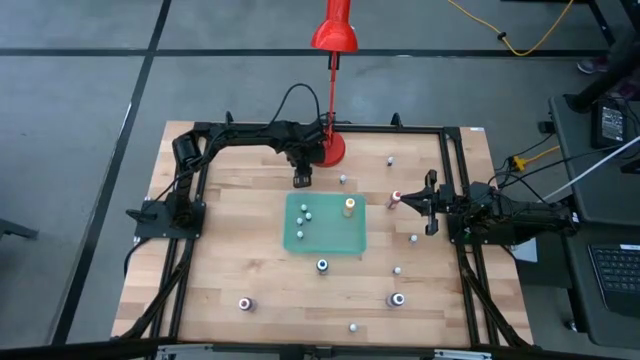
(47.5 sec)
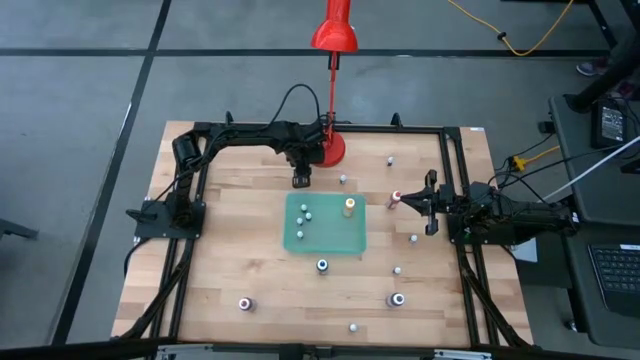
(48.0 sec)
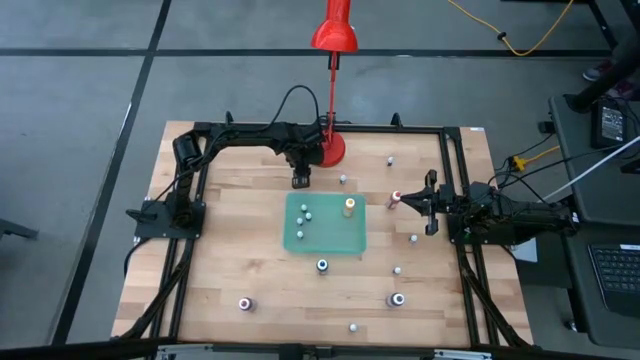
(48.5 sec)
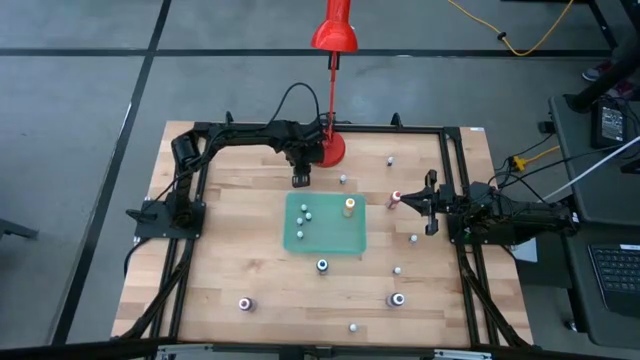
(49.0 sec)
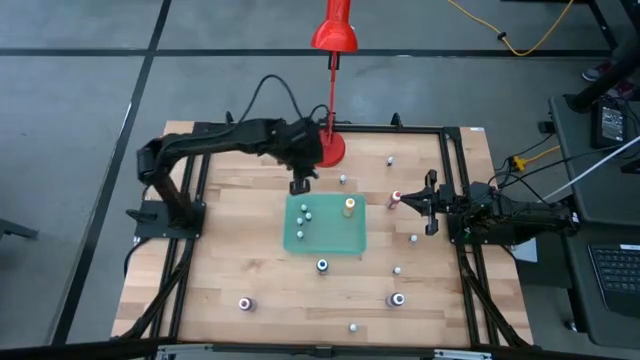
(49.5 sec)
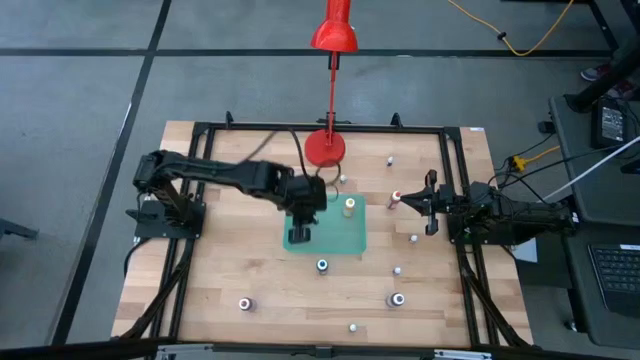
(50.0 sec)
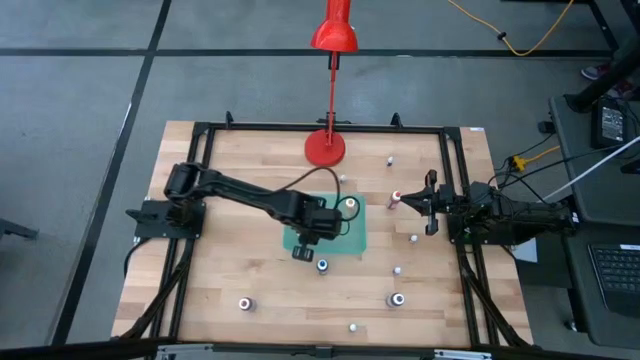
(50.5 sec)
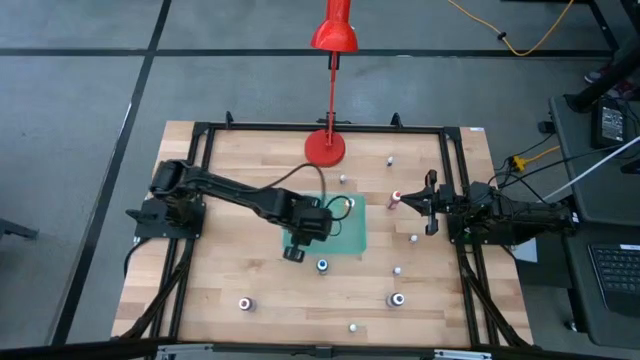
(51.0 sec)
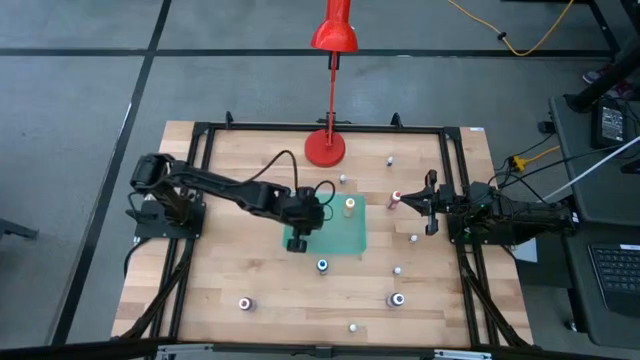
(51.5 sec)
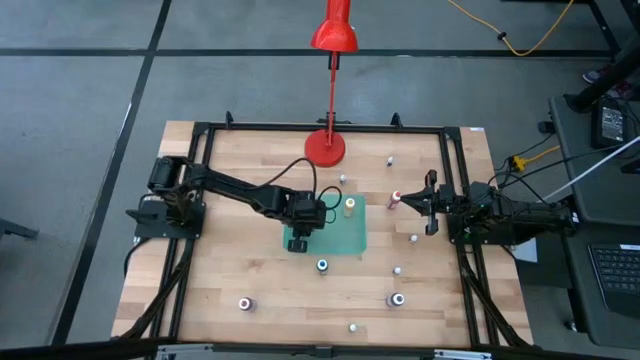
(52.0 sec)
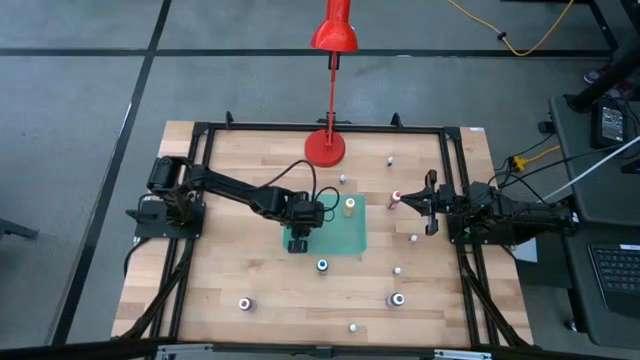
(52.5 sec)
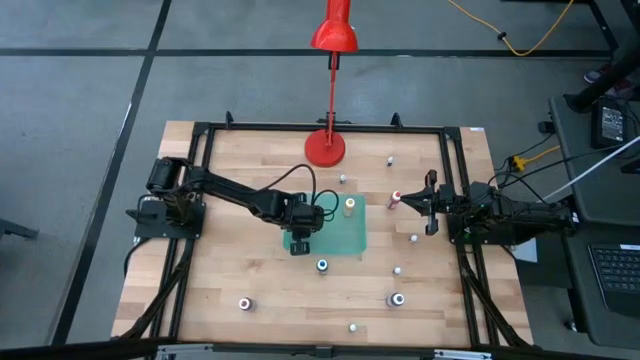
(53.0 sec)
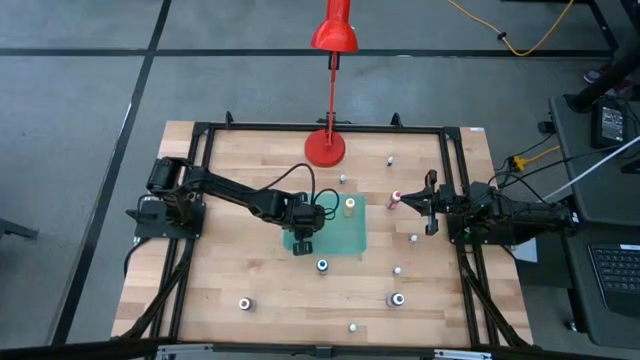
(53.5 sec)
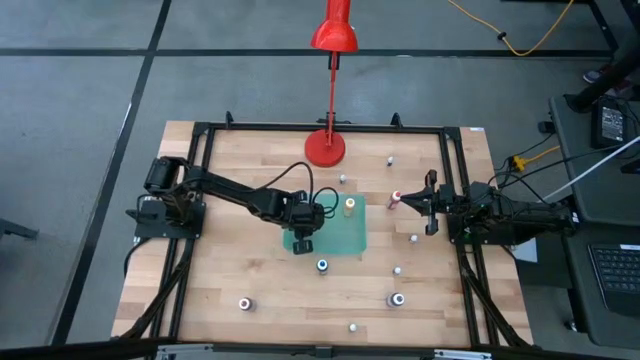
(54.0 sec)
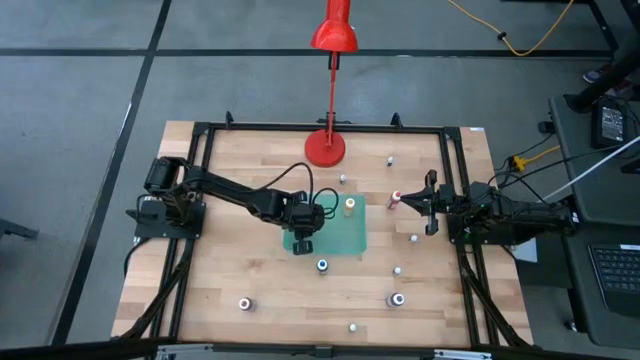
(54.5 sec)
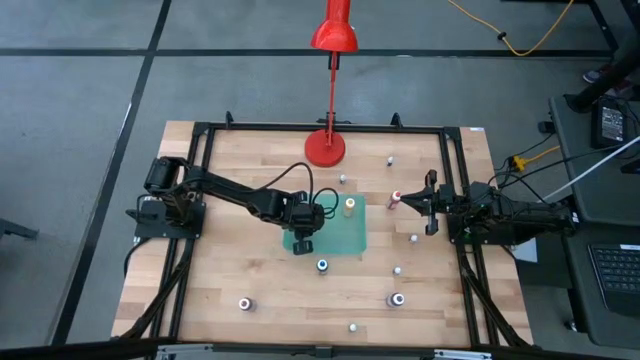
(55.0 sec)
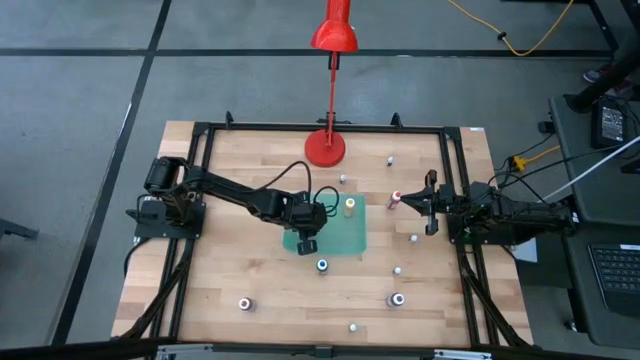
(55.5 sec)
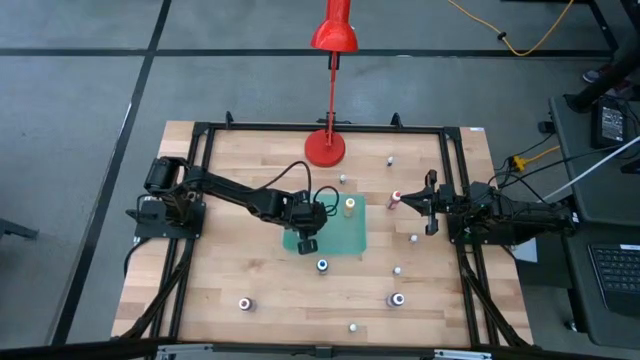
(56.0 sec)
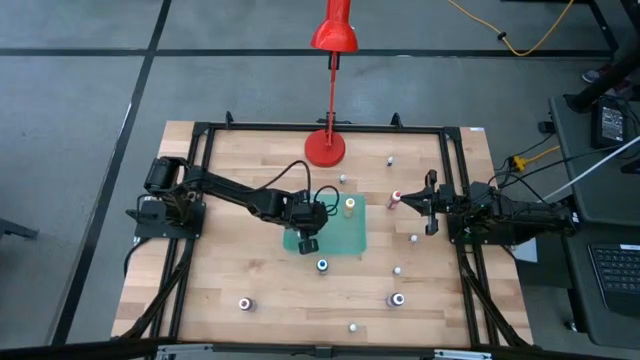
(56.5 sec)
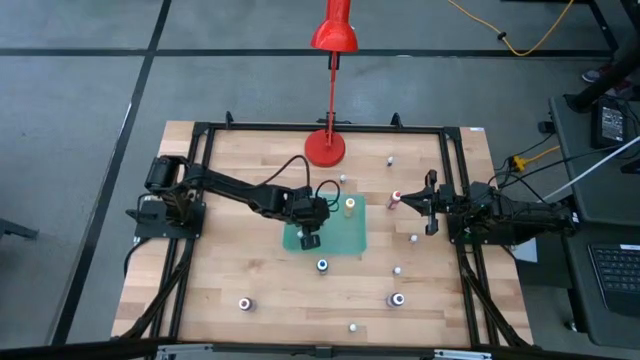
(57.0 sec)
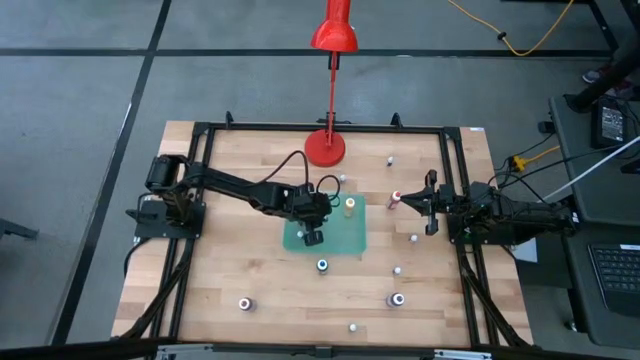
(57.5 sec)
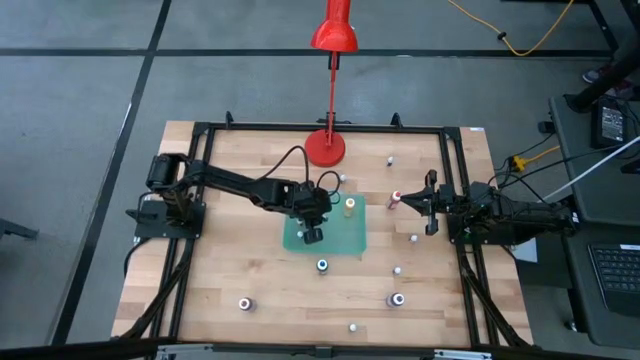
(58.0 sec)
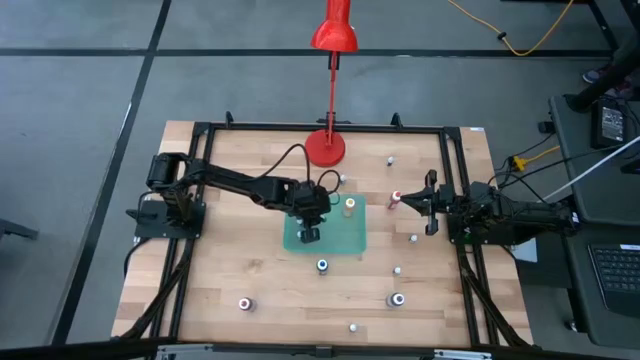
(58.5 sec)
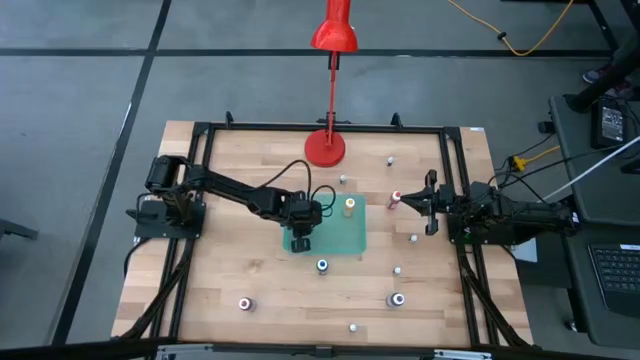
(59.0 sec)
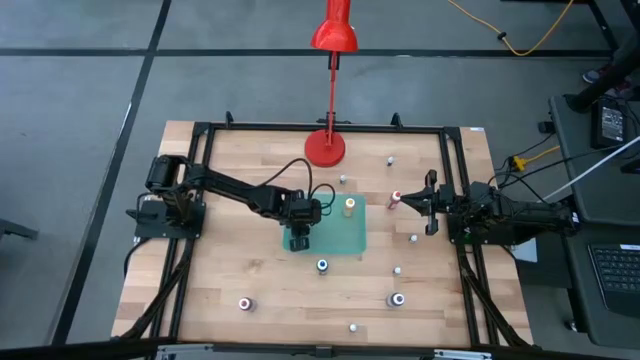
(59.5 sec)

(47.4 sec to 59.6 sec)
Task: Pick & Place food coloring
Put the small blue food coloring bottle into the green bin

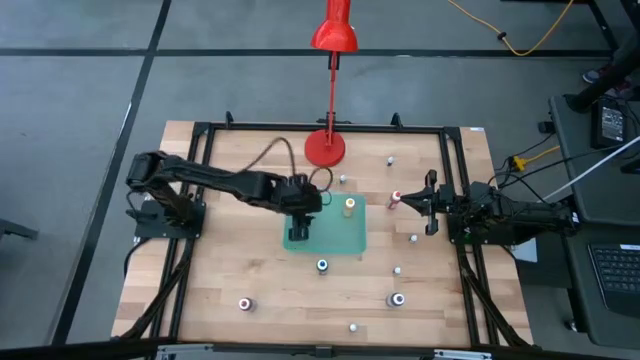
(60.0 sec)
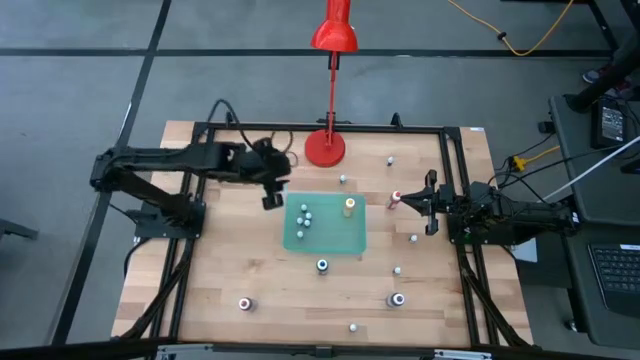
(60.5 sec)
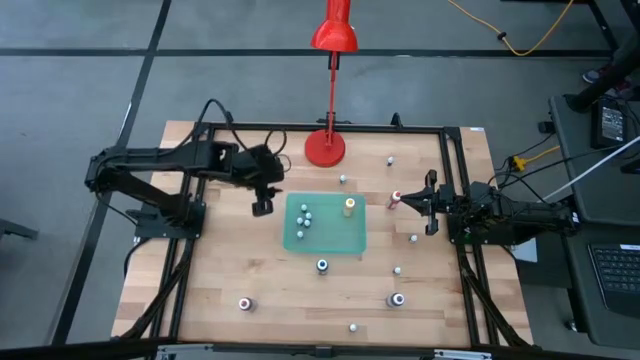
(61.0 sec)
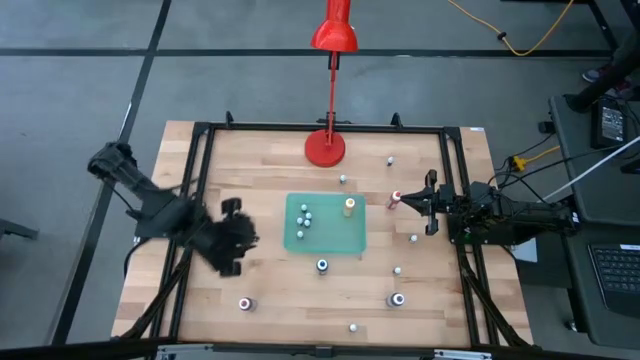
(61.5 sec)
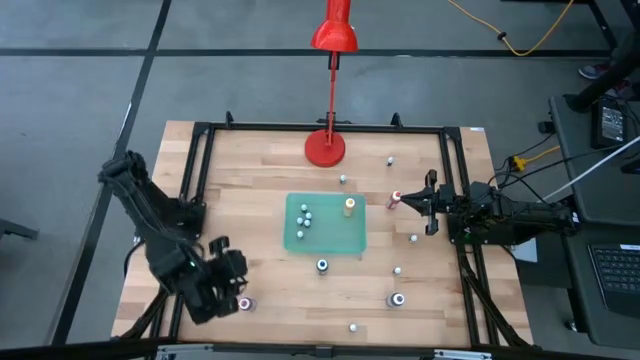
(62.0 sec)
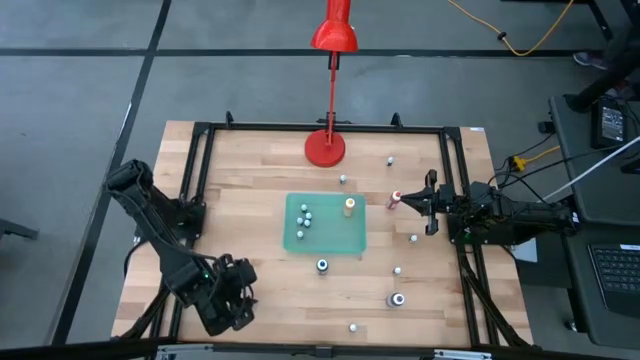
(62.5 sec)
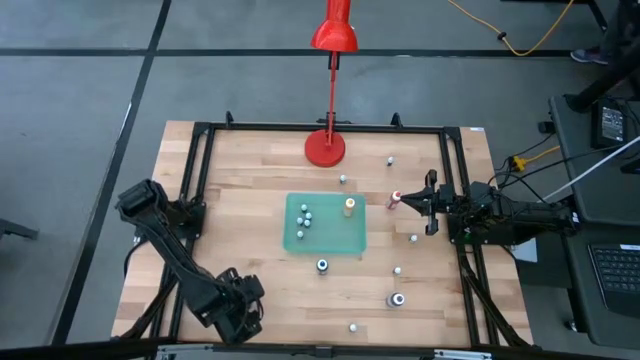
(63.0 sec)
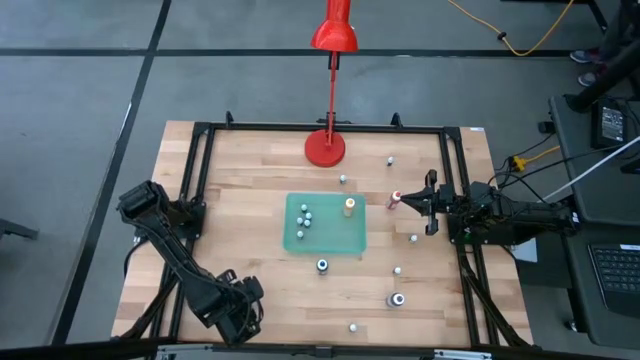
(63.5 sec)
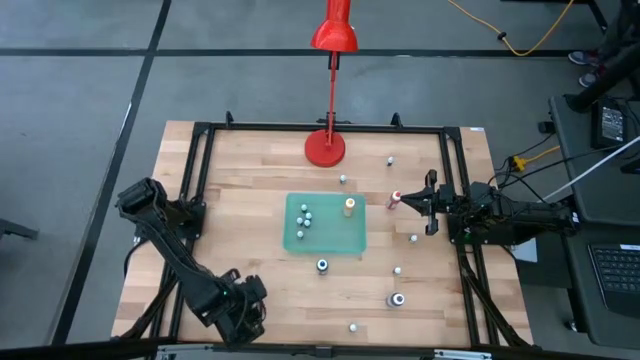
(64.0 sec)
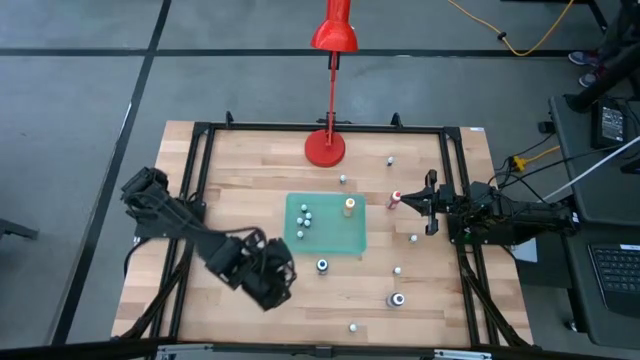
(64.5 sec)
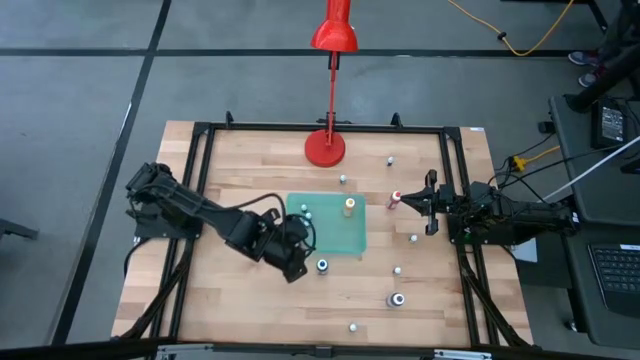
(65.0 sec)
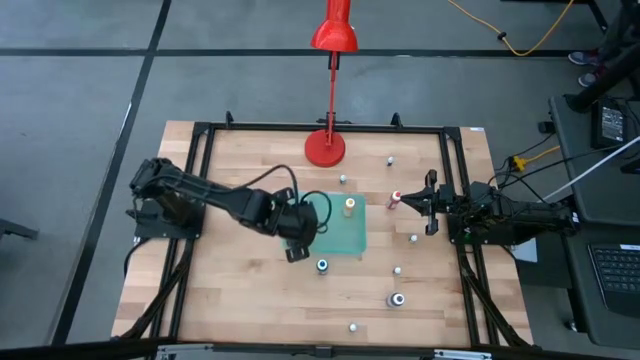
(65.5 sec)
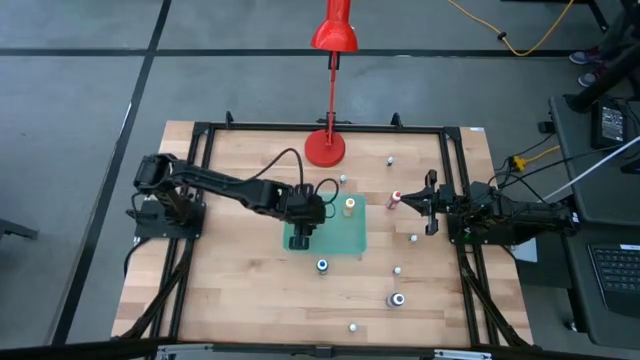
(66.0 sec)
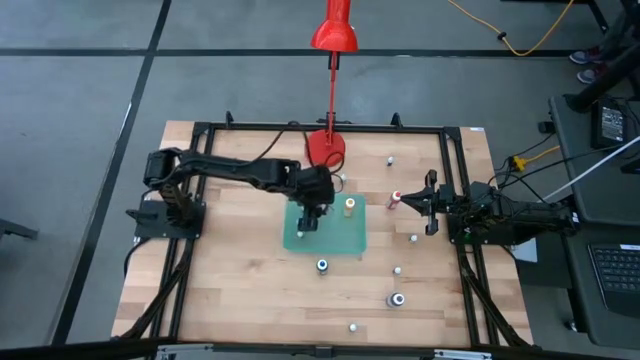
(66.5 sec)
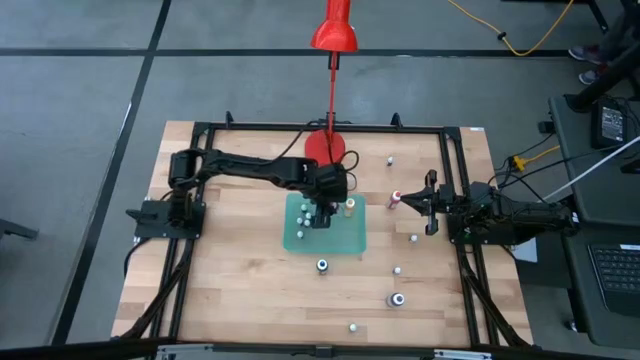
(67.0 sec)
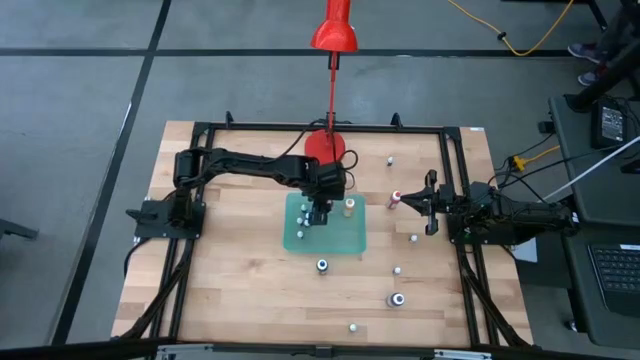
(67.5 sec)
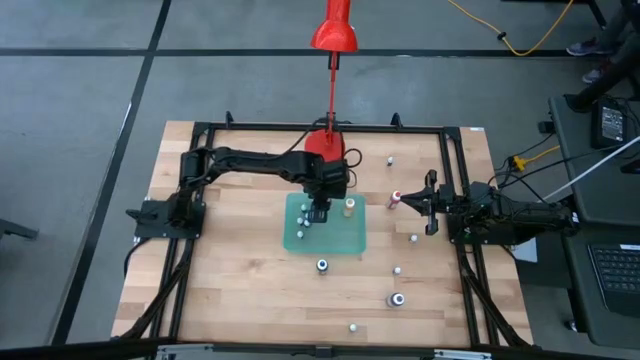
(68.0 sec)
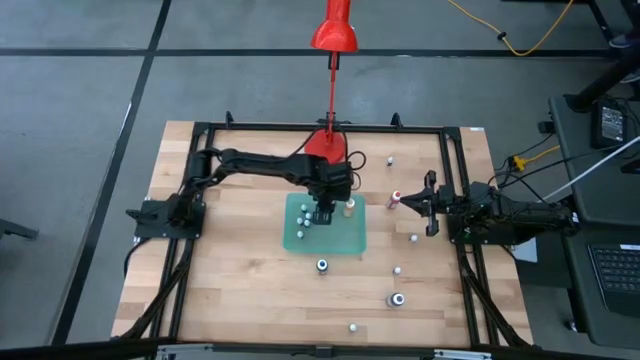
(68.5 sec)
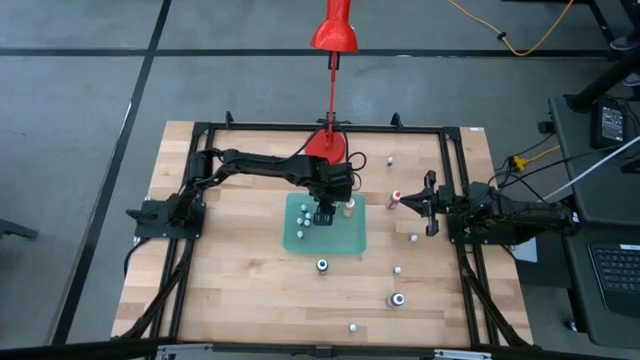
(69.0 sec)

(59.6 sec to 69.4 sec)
Put the large pink food coloring bottle into the green bin
